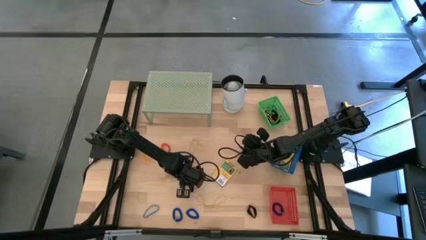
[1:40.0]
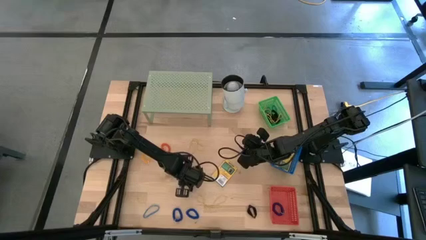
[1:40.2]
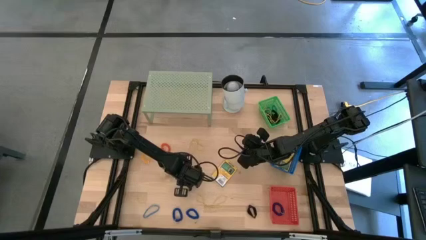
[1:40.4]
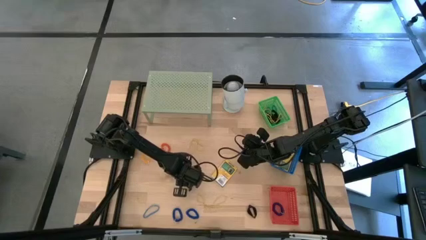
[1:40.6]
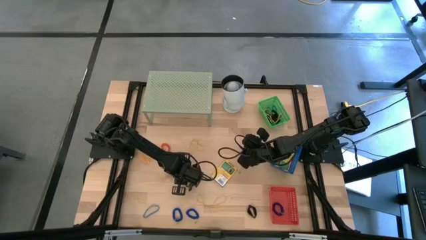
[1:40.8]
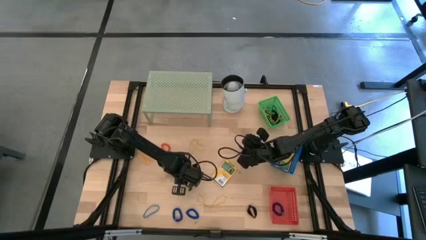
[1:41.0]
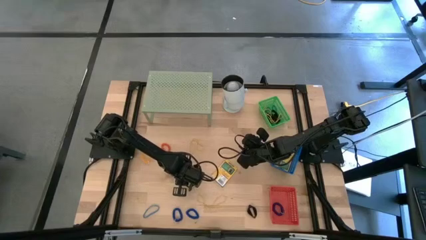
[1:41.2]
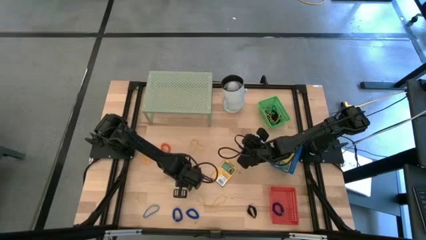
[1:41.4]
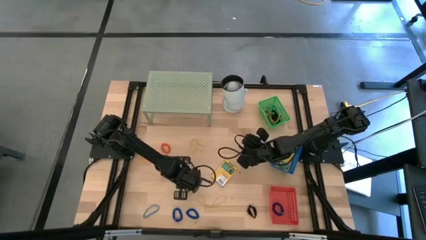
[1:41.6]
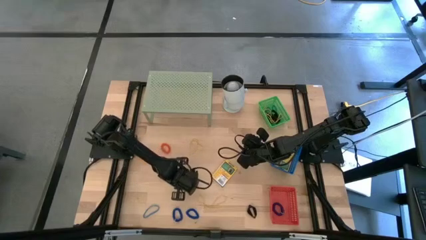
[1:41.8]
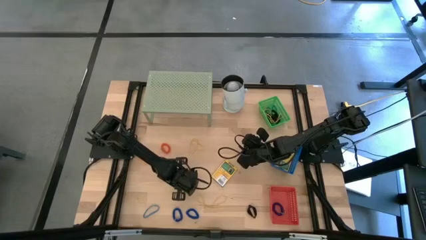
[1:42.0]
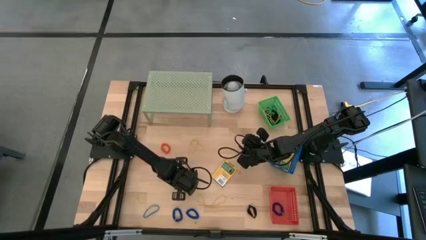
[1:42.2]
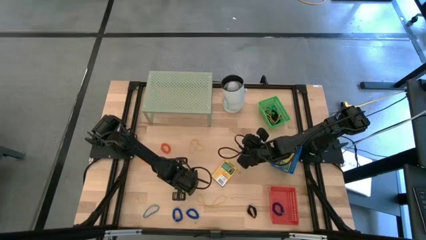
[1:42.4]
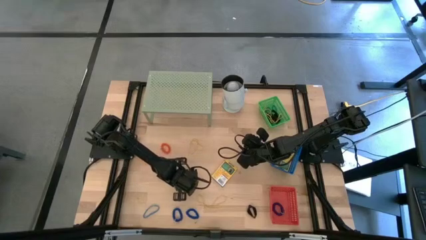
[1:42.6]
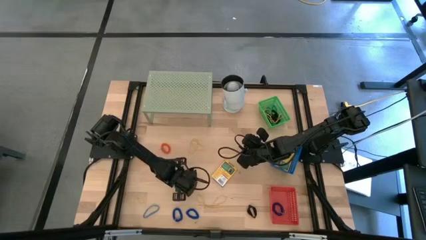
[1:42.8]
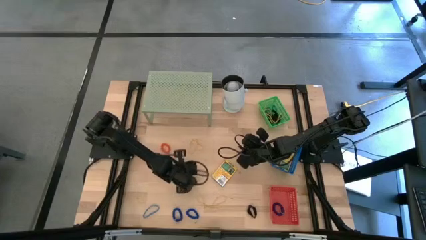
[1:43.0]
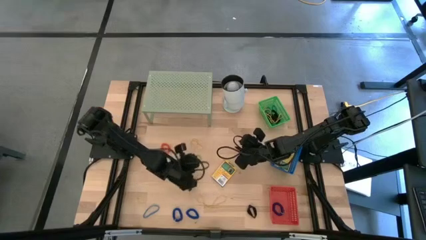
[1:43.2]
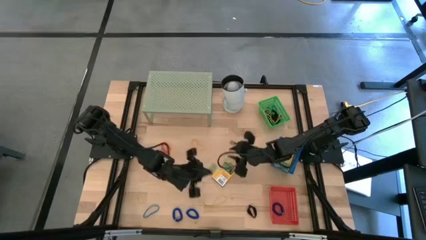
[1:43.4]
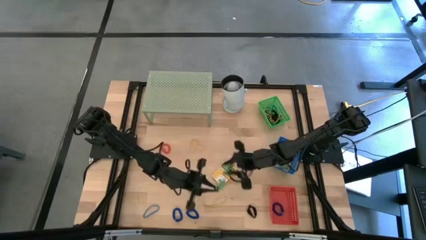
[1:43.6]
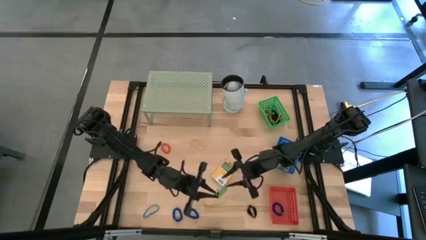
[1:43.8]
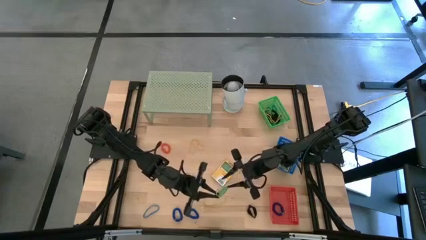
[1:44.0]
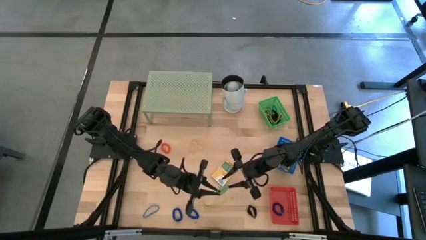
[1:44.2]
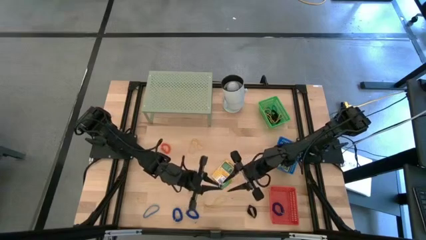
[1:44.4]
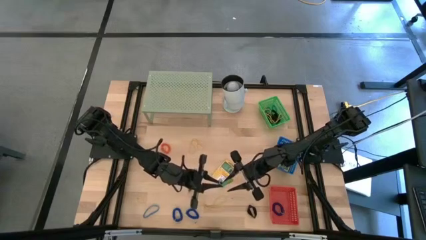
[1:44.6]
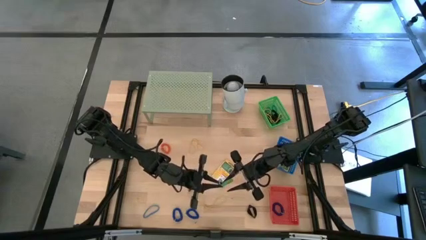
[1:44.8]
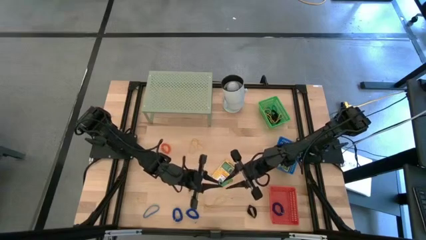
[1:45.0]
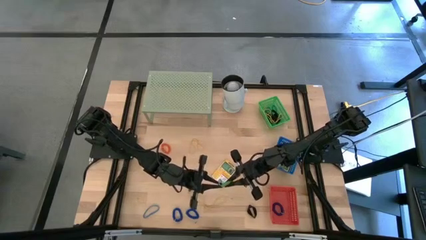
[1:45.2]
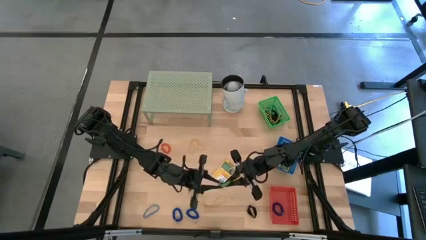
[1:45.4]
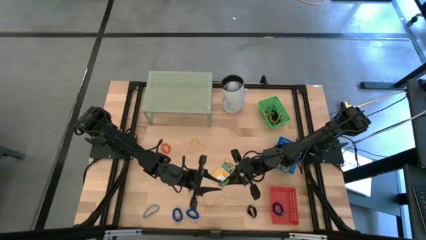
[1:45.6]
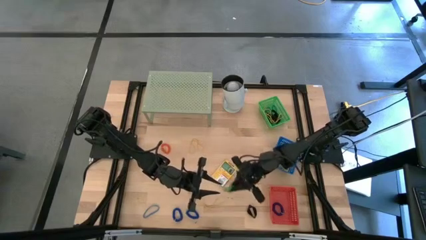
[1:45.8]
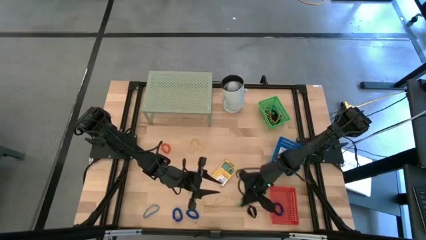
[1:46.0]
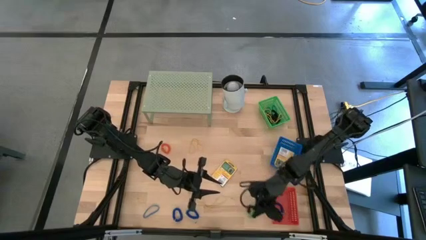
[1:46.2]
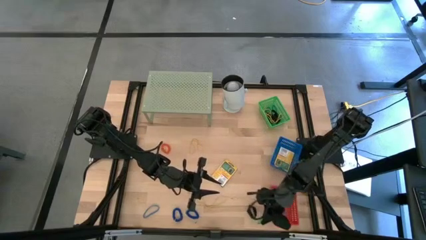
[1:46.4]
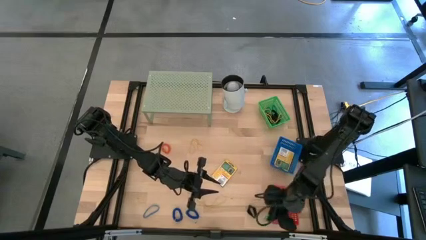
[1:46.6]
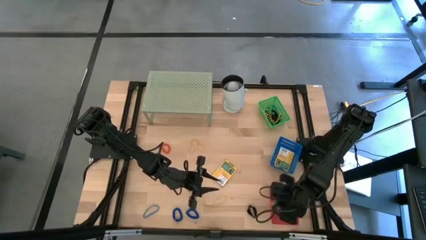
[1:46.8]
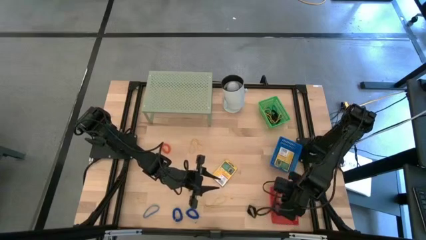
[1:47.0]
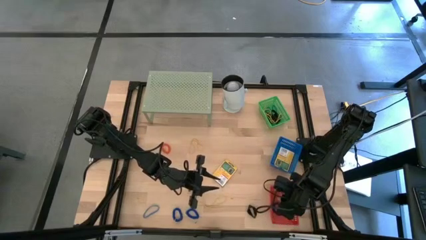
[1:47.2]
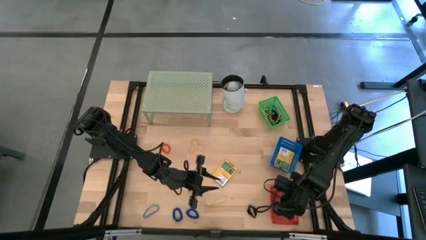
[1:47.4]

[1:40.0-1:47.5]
Task: Pick & Place Office Desk Supplies
Put the green spiral keychain into the red bin

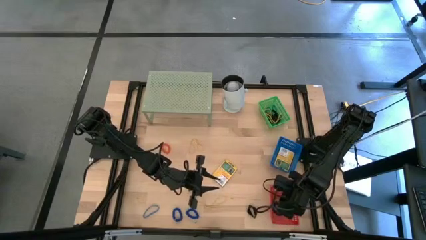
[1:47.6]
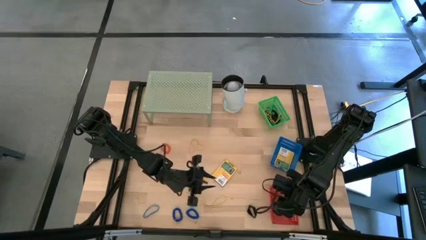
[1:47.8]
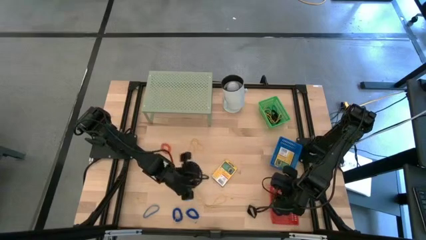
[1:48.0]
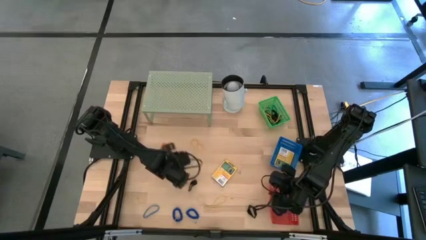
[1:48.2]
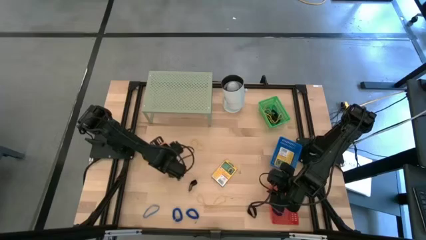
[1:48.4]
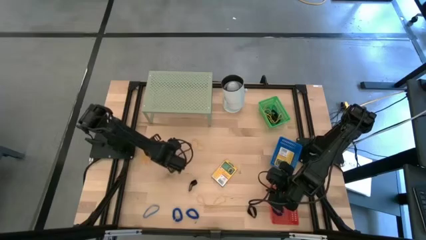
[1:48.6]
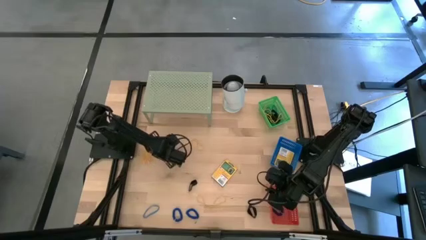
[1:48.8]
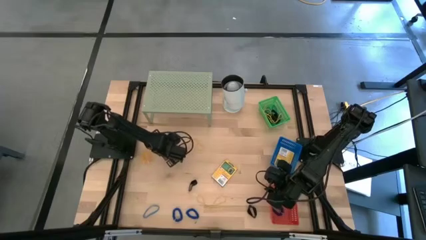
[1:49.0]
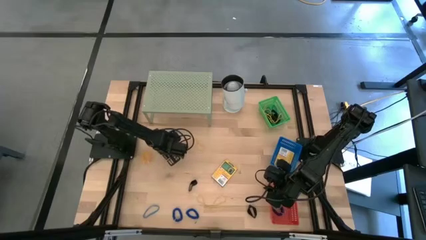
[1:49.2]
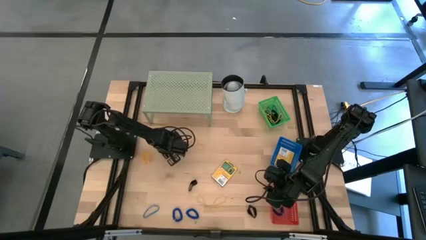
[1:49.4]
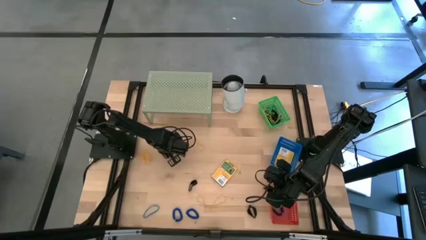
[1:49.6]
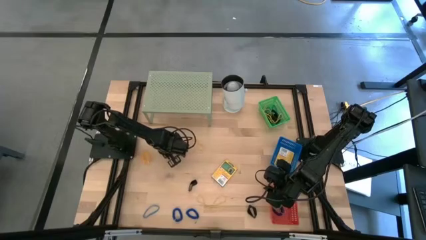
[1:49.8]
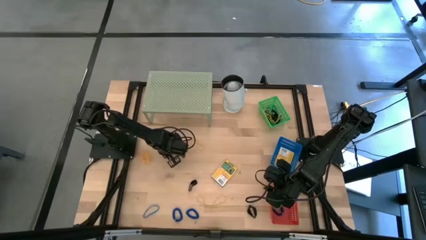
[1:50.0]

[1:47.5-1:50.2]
Put the orange spiral keychain into the red bin

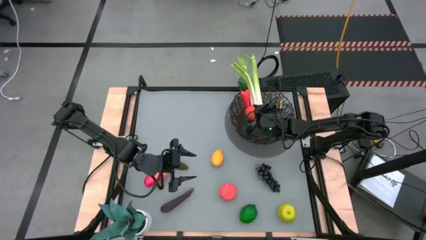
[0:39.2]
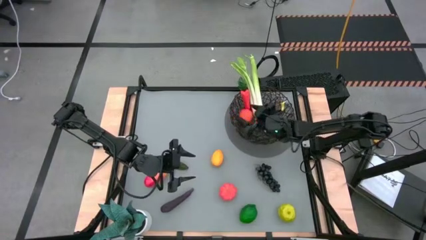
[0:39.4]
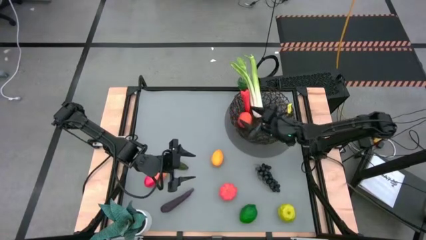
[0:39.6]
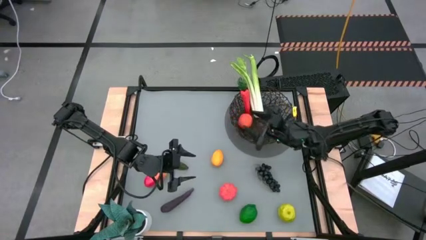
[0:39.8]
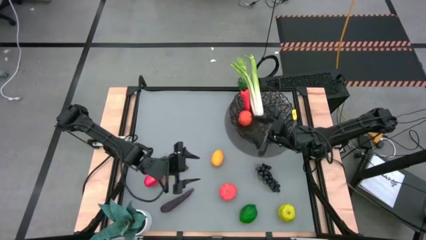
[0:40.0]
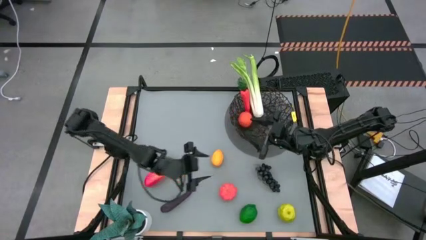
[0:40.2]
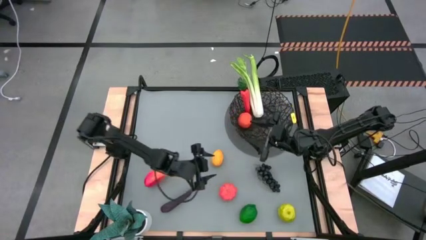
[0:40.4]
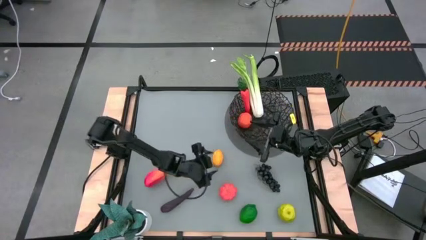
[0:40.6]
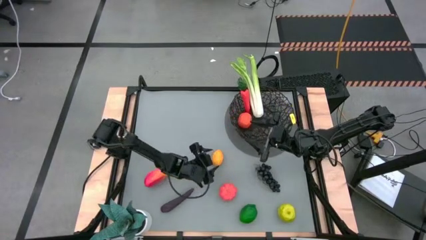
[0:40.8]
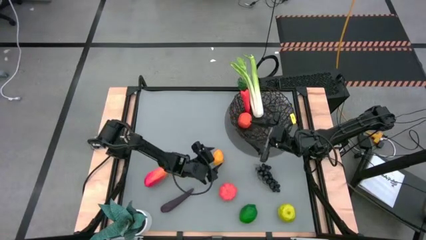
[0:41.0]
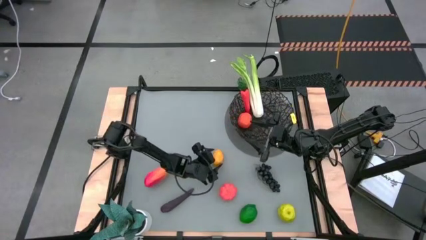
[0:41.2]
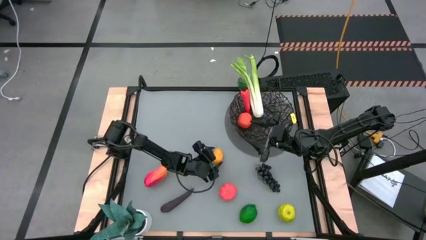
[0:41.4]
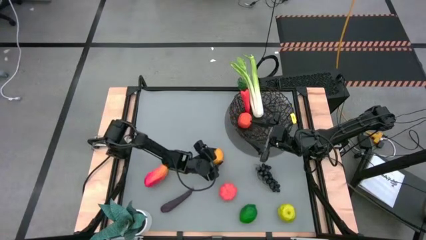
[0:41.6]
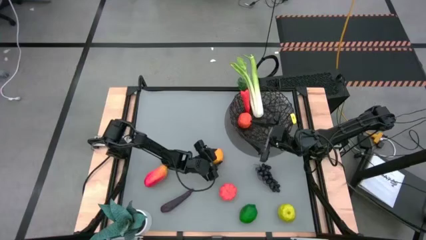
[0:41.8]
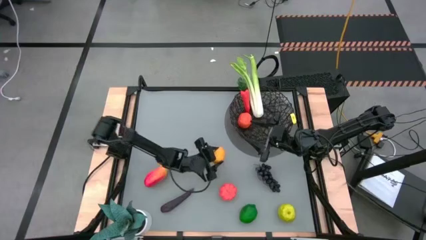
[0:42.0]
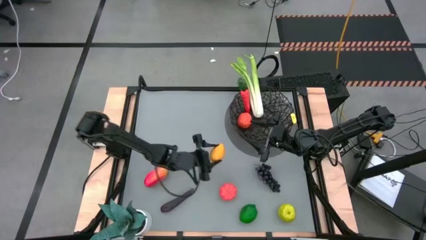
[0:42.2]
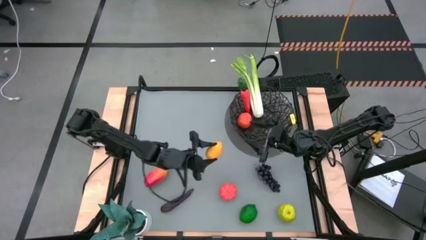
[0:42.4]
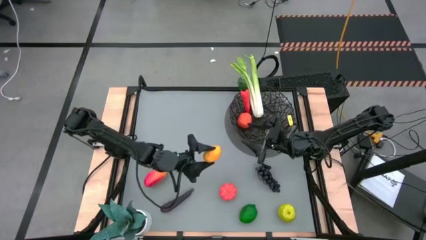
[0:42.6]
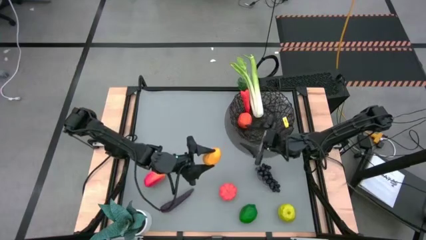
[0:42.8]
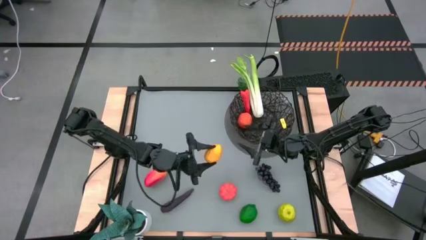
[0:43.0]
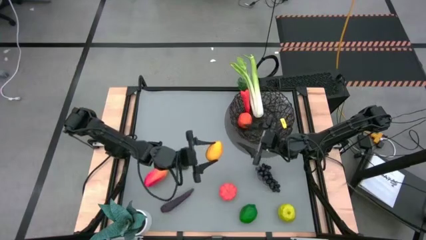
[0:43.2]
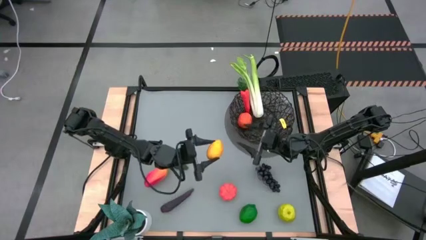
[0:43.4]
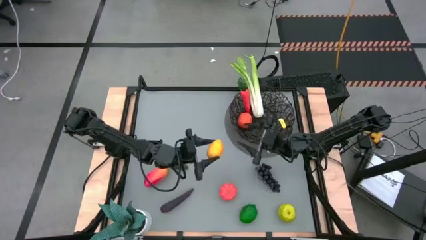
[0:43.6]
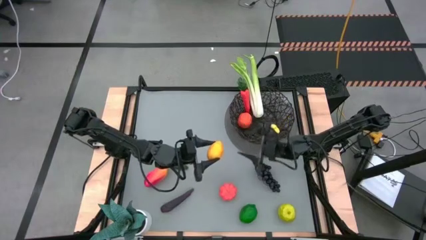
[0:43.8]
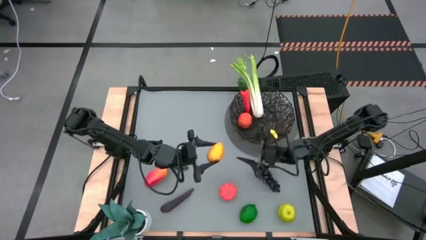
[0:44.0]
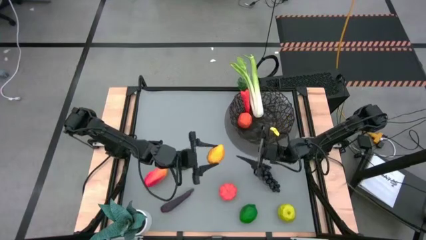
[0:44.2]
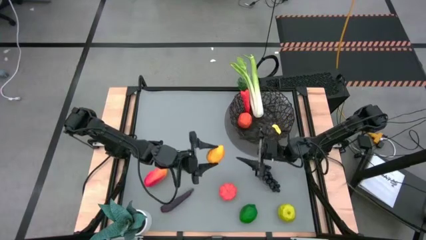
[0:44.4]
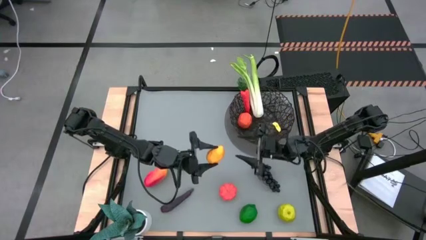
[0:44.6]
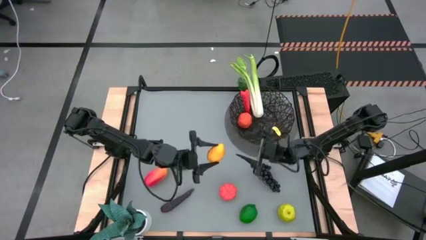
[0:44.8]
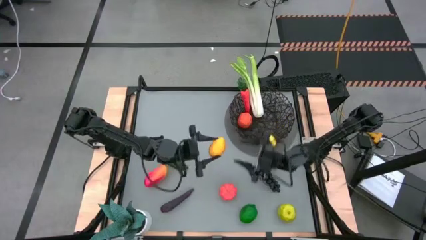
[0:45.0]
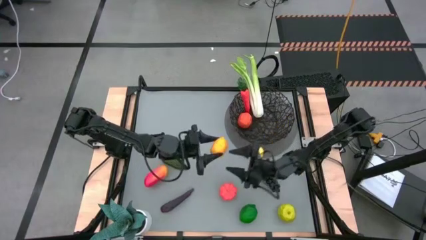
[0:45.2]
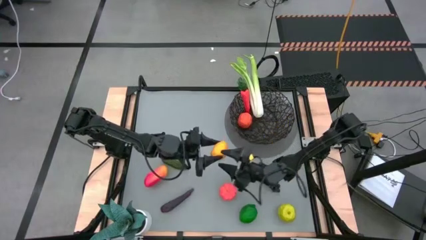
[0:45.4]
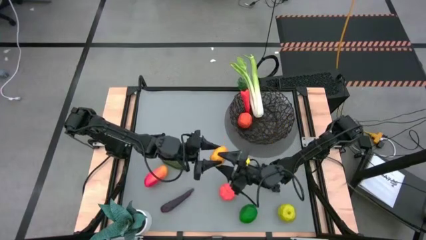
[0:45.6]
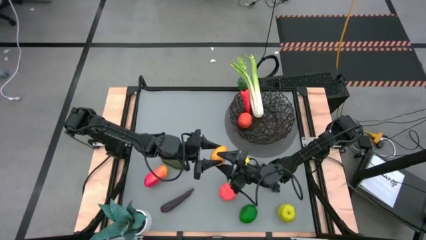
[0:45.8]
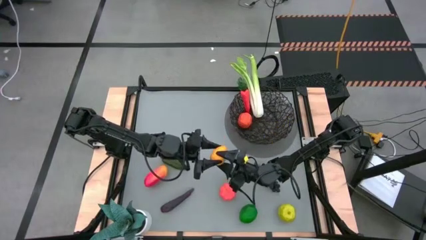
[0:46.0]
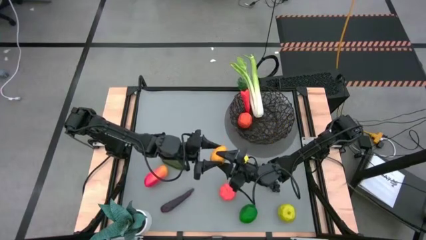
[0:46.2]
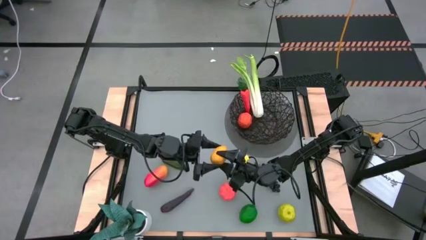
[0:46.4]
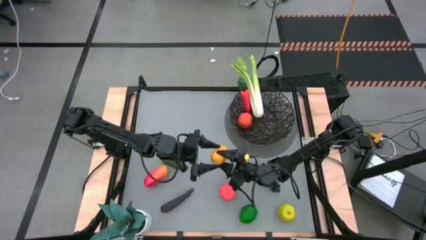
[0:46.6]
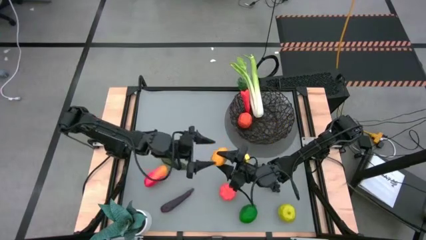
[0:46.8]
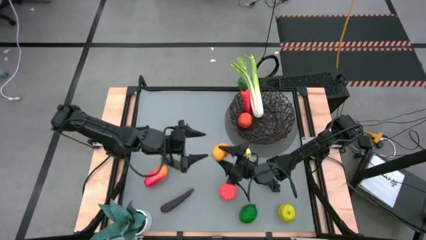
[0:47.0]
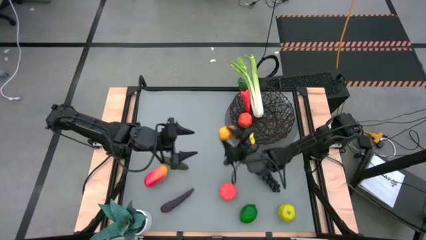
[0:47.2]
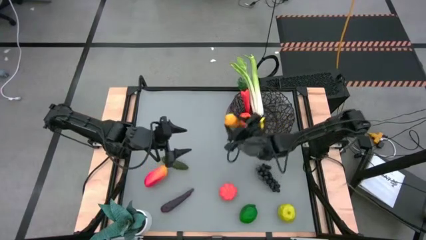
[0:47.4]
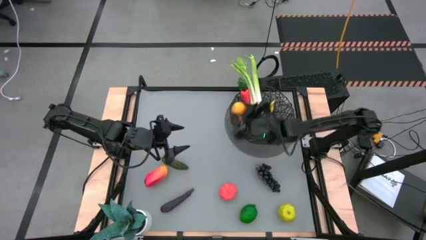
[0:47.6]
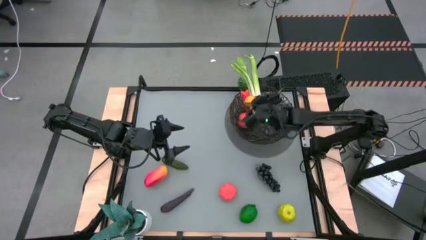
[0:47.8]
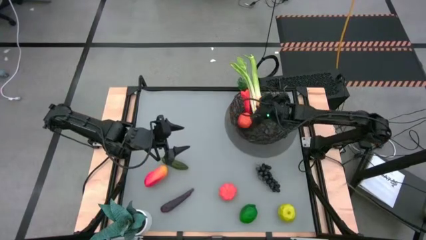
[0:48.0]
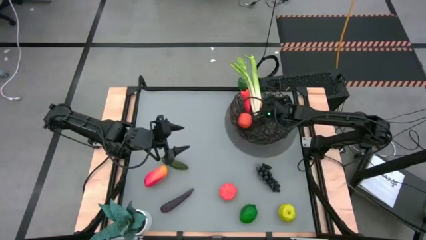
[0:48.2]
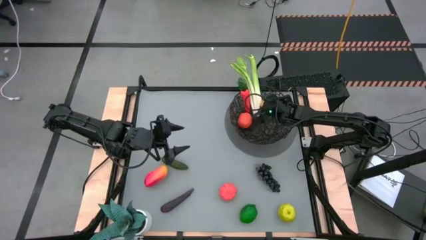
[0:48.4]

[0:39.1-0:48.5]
Task: Build produce basket
Put the lemon into the black wire basket
